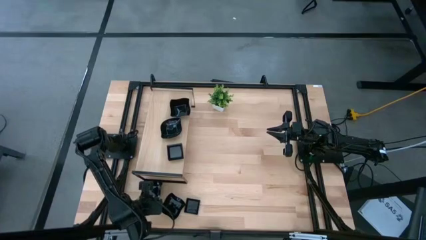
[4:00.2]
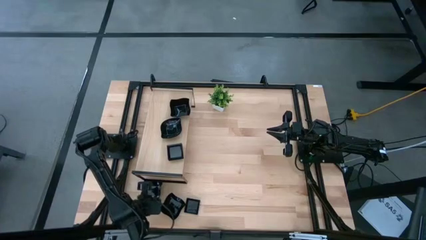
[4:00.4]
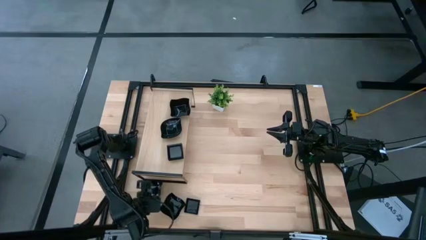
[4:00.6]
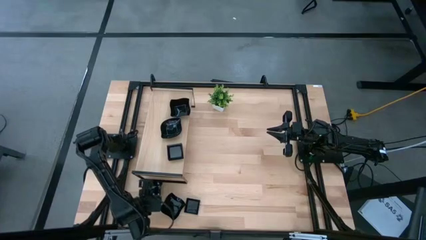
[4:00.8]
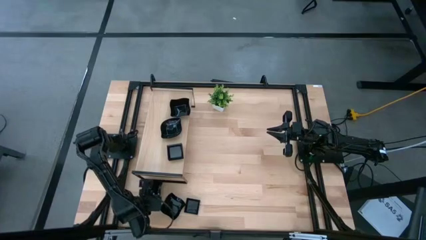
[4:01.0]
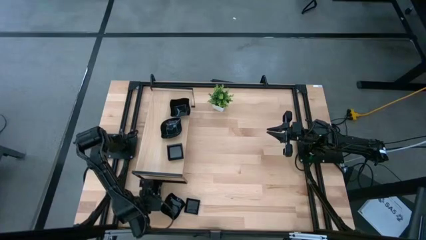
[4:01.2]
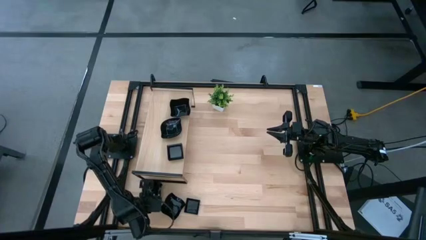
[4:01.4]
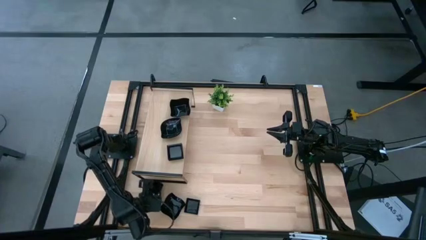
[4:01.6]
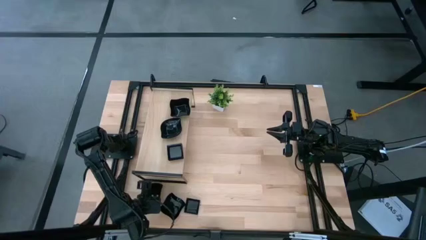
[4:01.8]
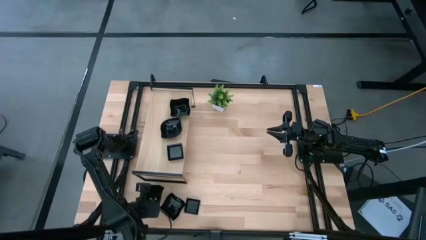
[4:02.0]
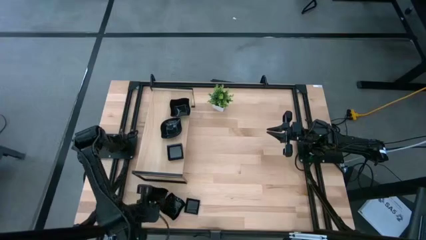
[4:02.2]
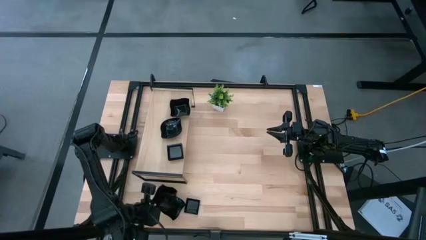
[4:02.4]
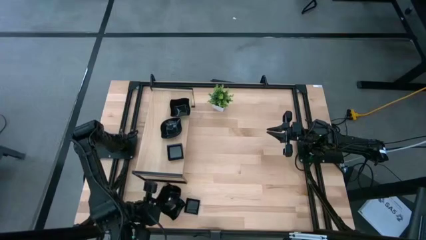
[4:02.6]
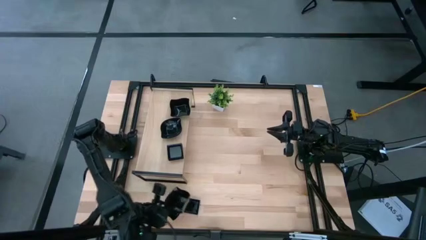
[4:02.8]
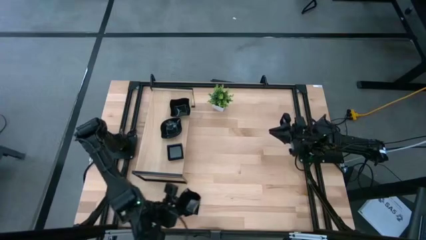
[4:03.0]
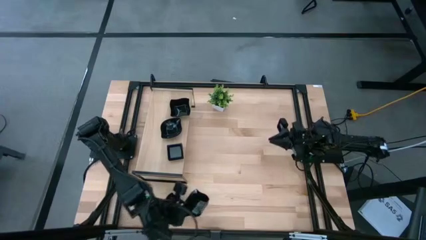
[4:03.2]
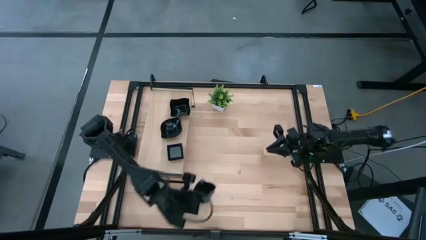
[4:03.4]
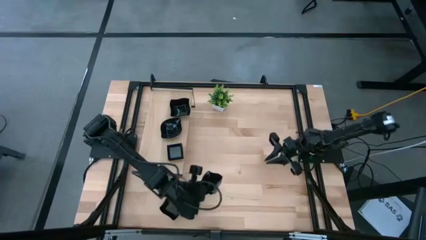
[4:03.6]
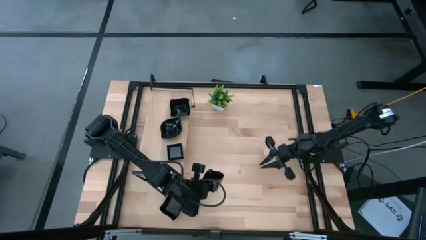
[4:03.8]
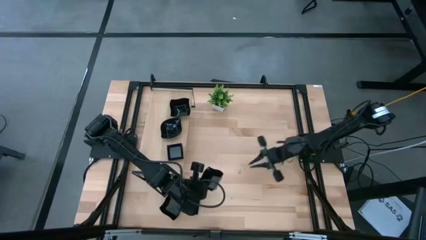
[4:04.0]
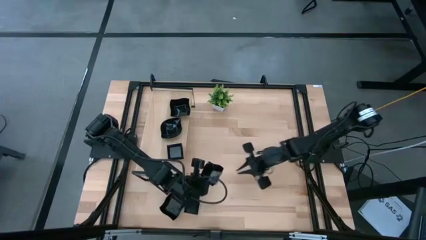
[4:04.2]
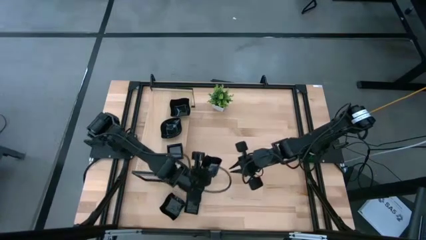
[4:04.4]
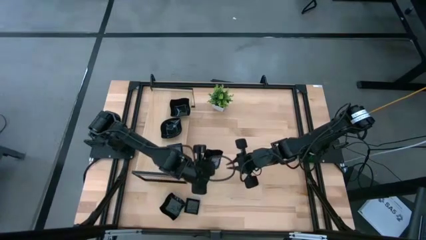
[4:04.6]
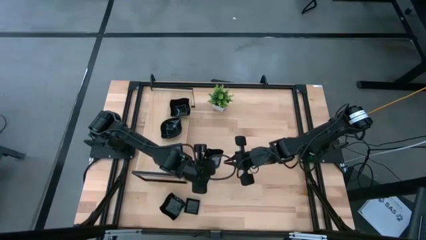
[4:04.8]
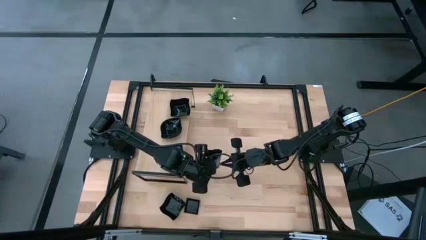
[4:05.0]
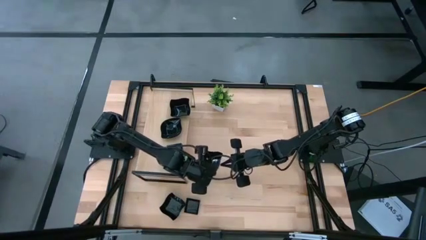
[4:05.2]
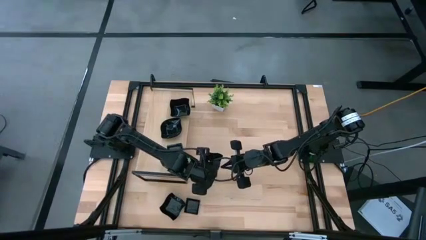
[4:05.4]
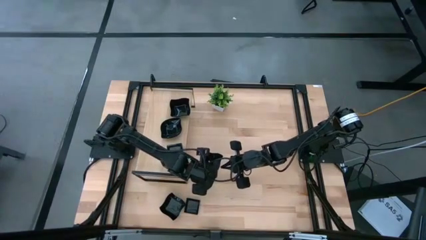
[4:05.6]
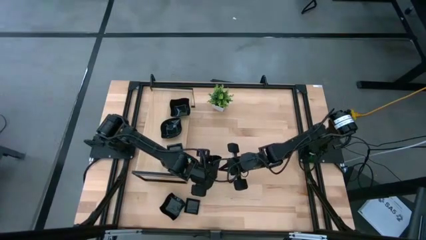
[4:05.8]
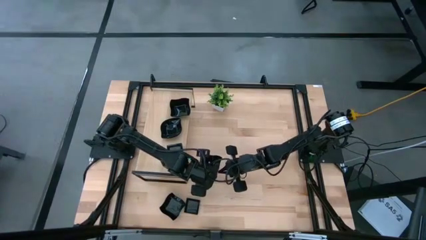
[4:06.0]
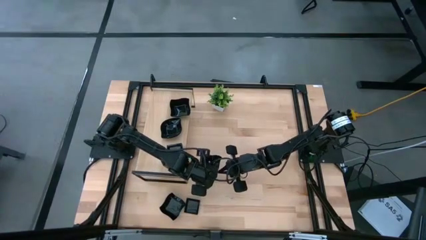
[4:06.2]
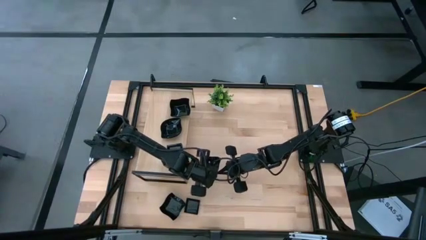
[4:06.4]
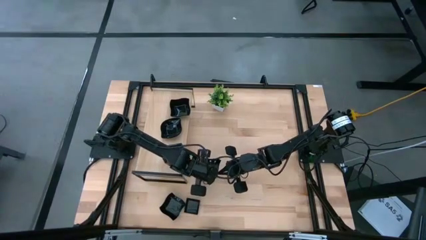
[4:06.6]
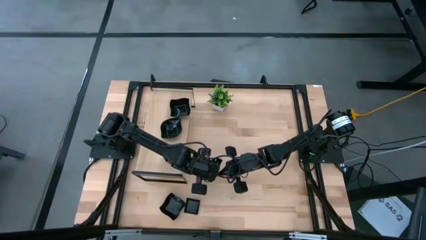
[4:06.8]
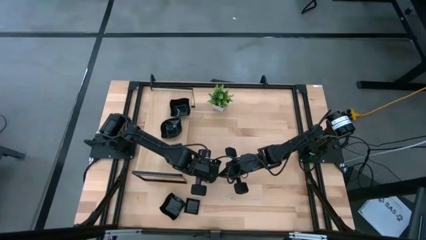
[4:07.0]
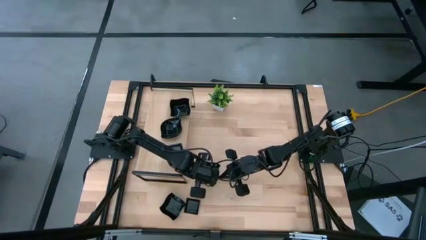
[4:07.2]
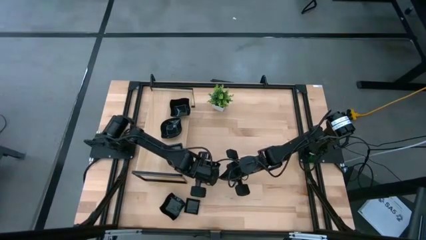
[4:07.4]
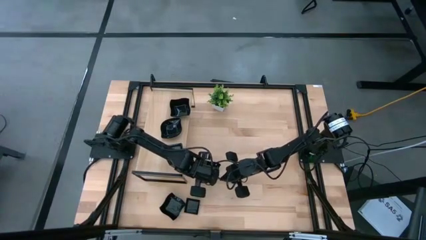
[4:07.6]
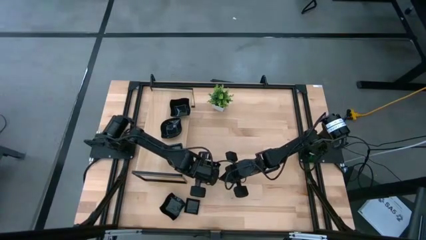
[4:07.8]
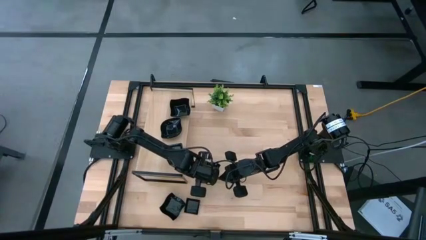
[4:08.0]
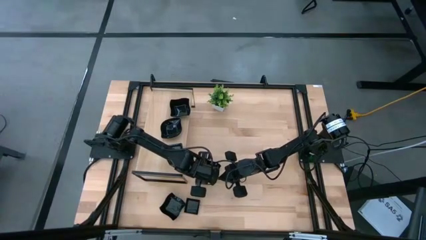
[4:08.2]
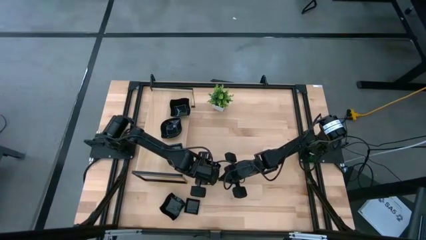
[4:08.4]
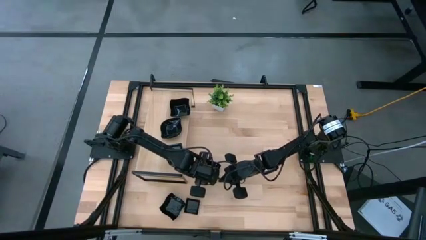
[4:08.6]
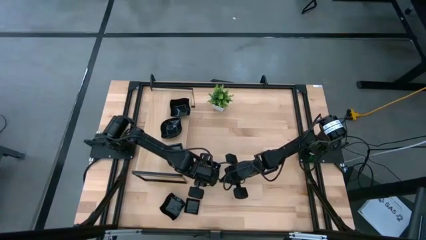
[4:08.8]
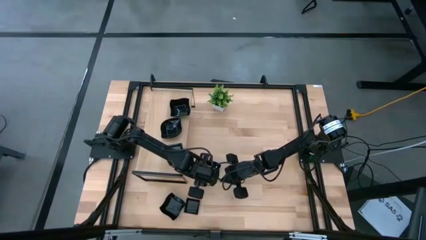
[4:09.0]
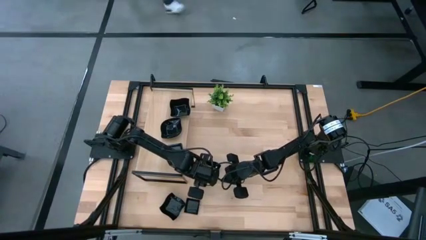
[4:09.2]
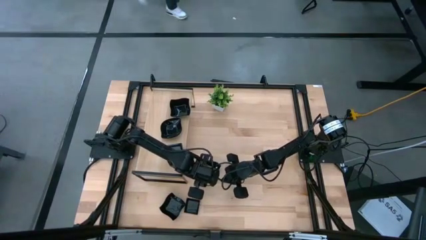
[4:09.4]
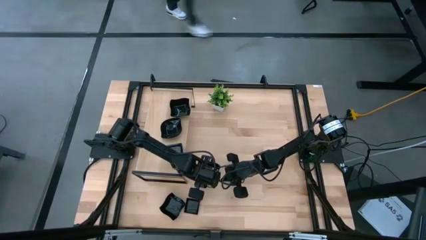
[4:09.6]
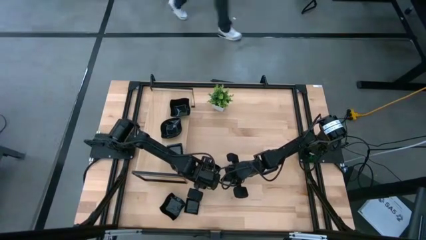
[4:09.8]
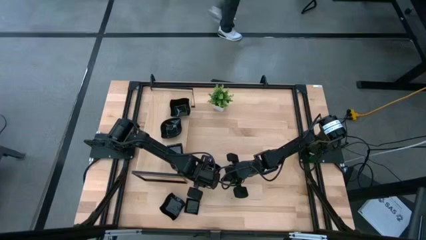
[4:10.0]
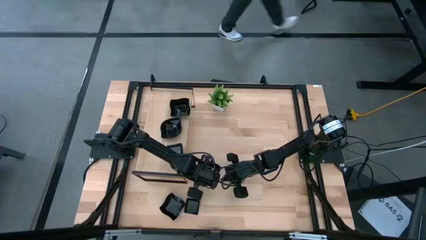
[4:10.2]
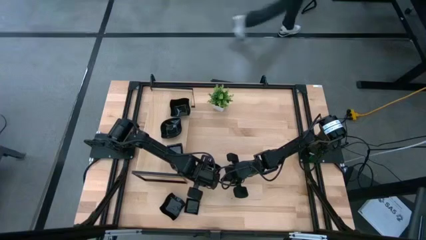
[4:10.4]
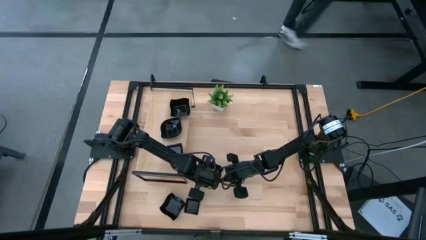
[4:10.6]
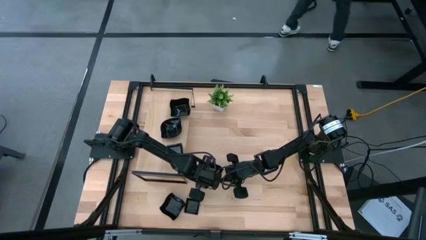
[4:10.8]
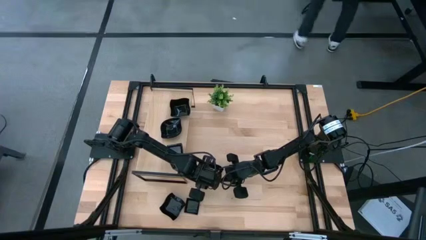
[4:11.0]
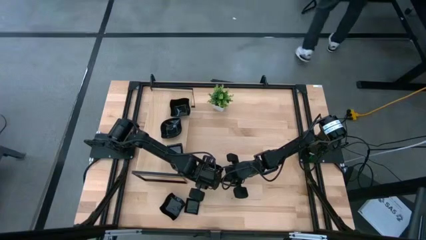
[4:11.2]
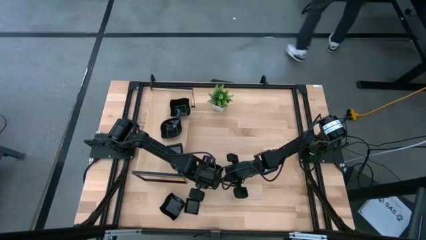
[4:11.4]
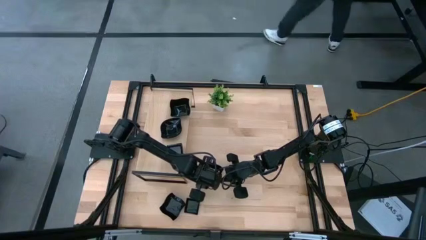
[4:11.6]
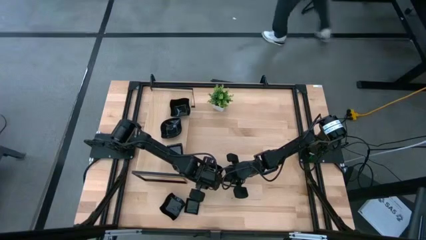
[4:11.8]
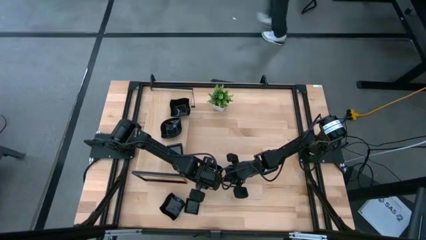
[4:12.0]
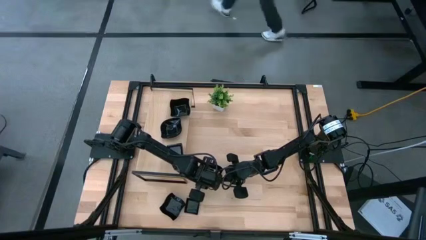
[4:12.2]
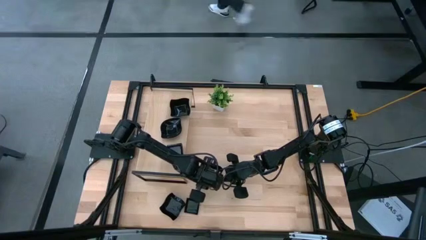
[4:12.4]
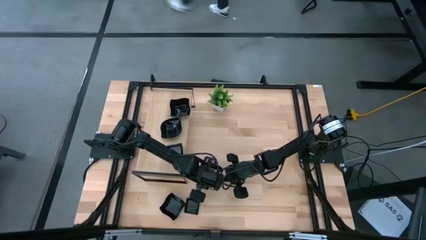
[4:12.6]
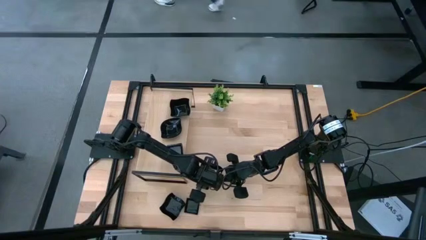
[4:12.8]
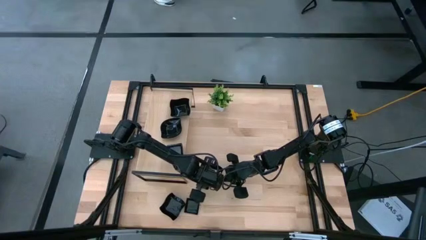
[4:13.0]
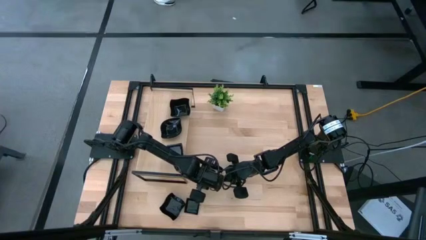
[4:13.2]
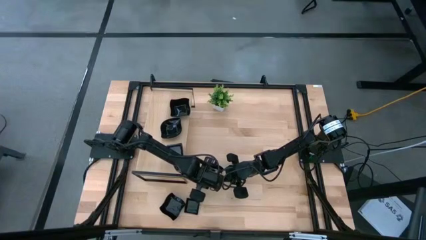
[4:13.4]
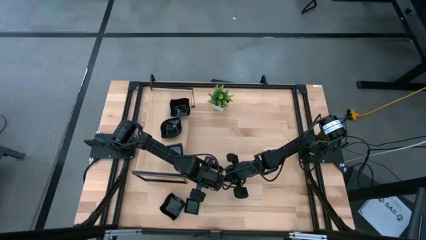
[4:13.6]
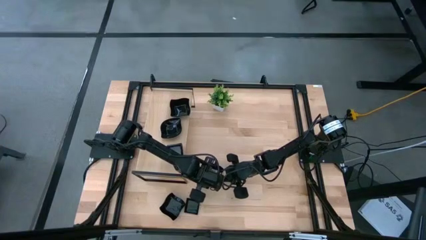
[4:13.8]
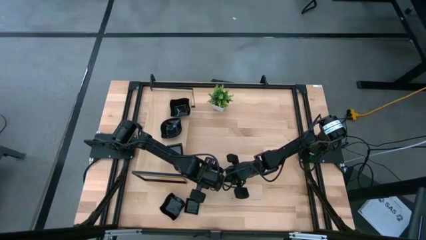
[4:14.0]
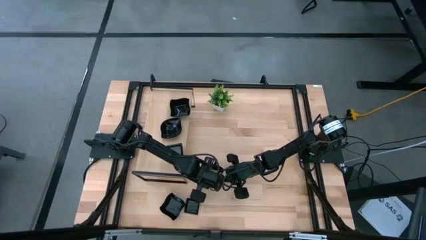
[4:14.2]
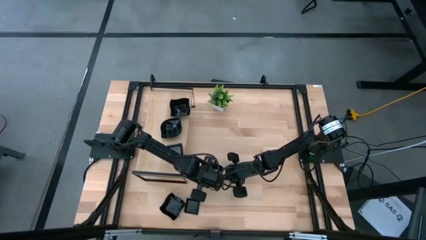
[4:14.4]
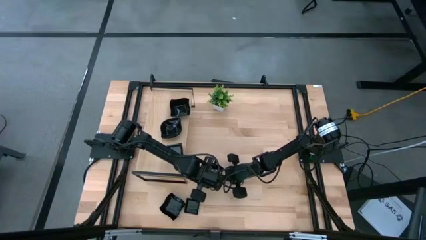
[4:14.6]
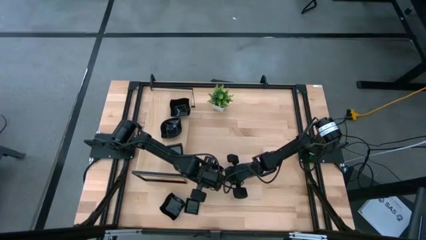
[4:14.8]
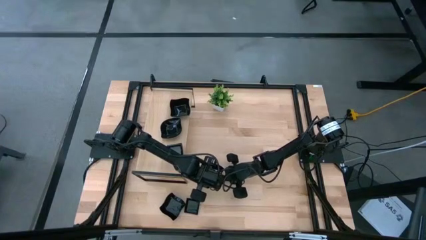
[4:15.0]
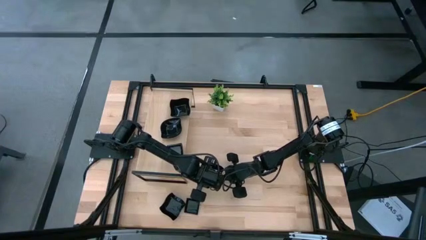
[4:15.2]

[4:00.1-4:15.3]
Task: Pick & Place Mini shaped plates
Stack the black distorted square plate on top of the black distorted square plate on the shelf

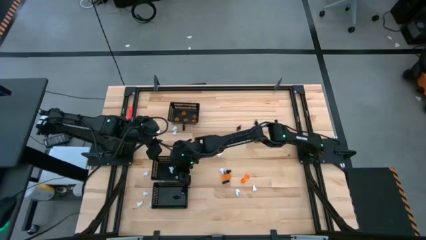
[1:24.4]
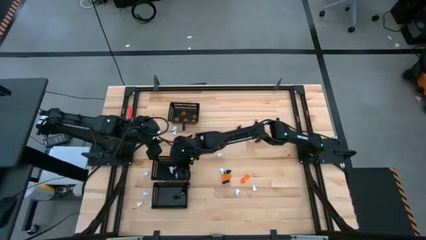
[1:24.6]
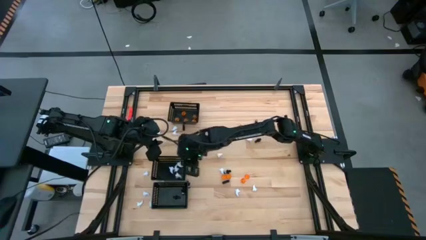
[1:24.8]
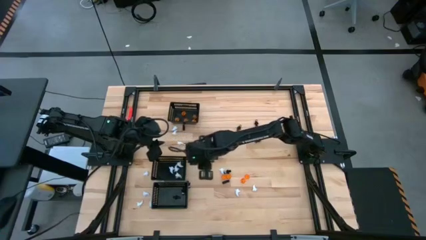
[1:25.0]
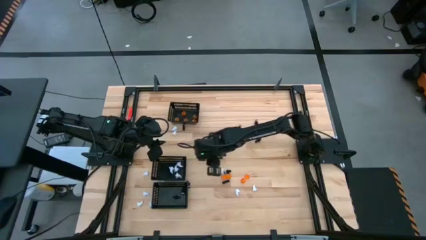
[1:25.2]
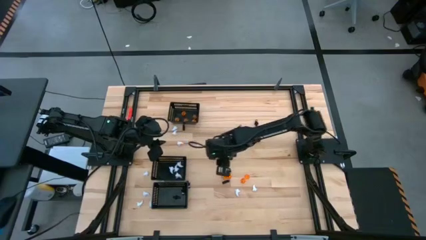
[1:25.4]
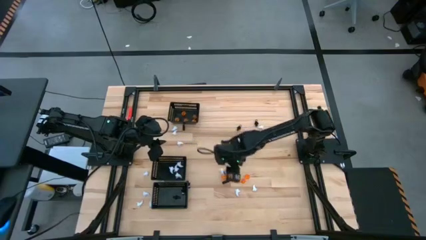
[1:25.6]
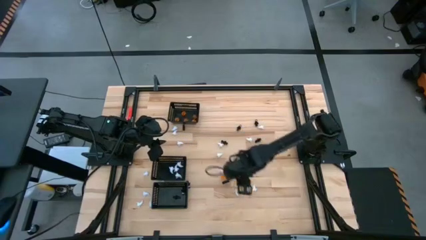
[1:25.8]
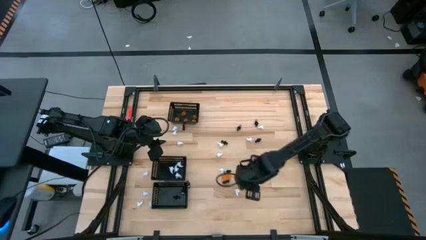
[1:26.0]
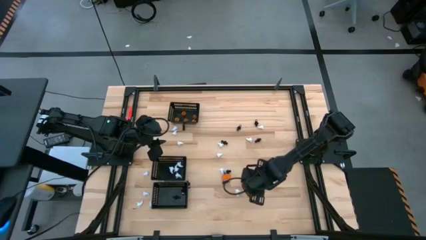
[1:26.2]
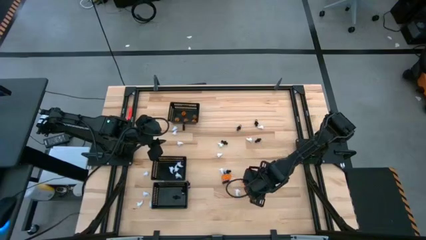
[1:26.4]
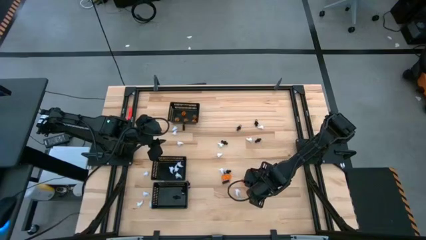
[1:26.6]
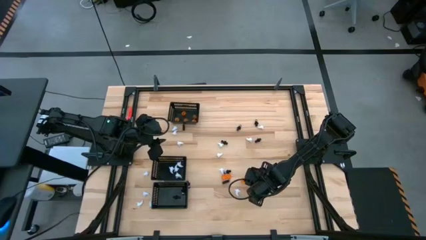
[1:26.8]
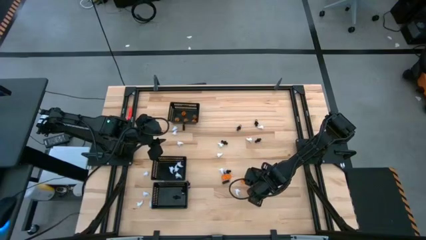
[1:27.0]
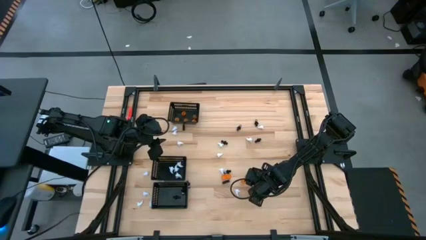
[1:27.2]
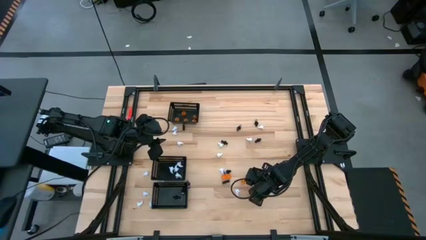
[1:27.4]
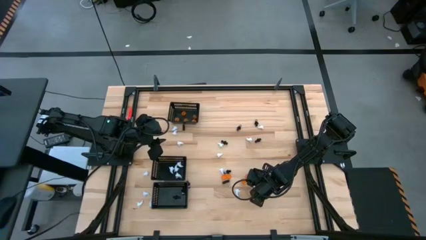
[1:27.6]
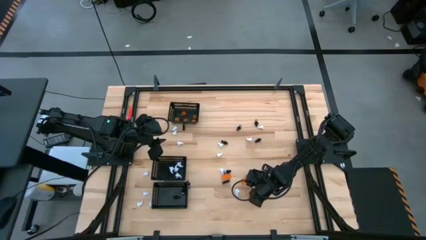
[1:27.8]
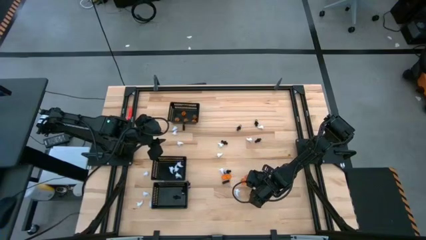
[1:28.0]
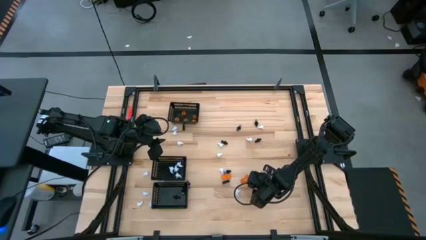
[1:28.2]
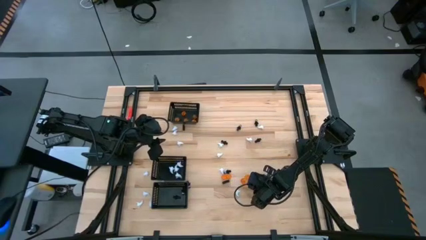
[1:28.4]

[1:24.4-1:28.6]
Task: Sort Halloween decoration
Put the white toy into the middle black bin
